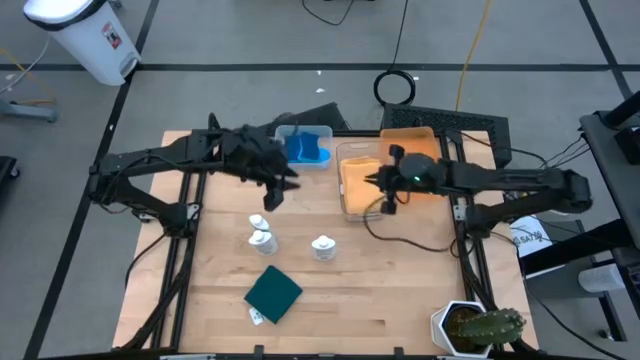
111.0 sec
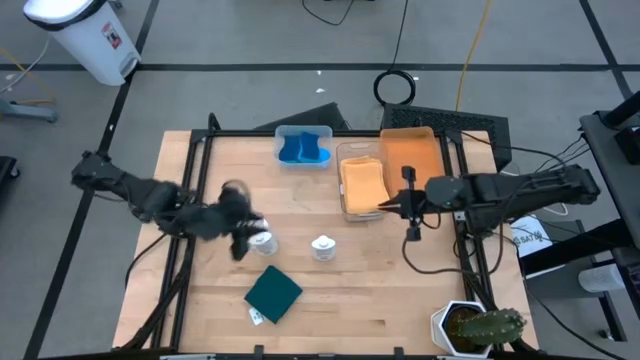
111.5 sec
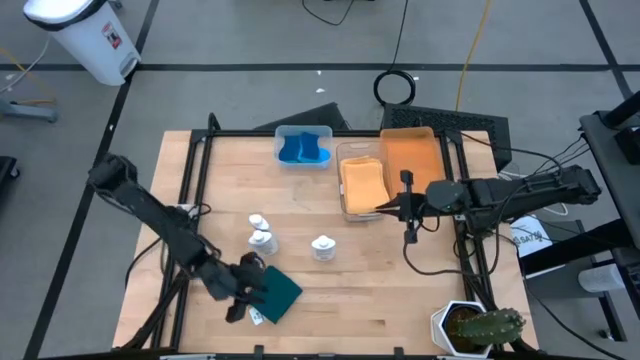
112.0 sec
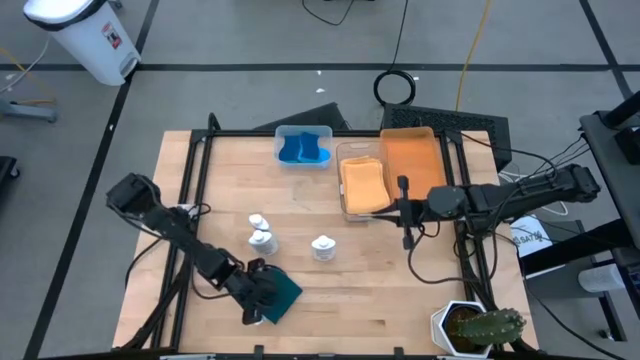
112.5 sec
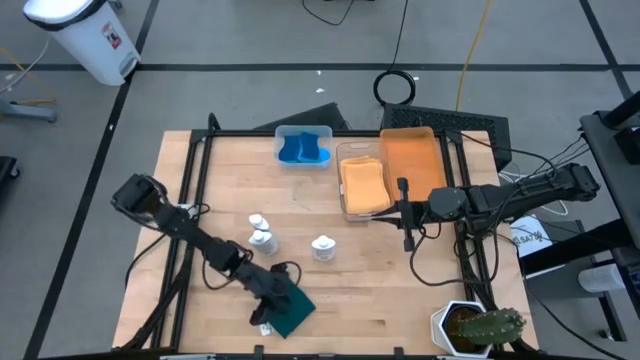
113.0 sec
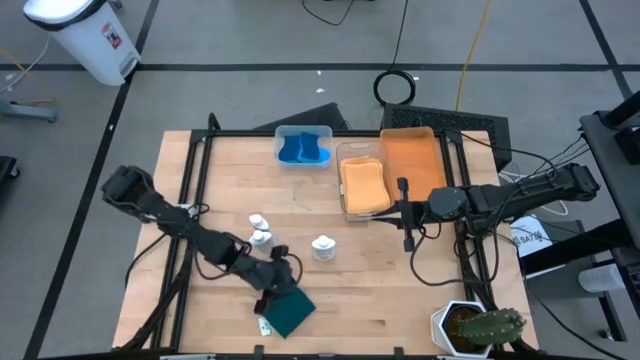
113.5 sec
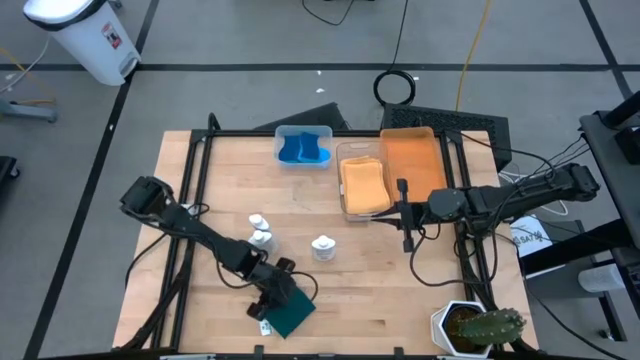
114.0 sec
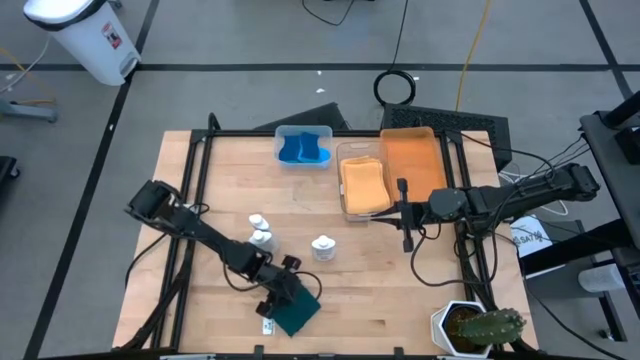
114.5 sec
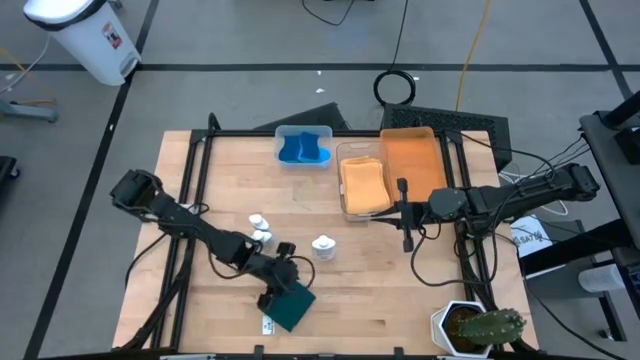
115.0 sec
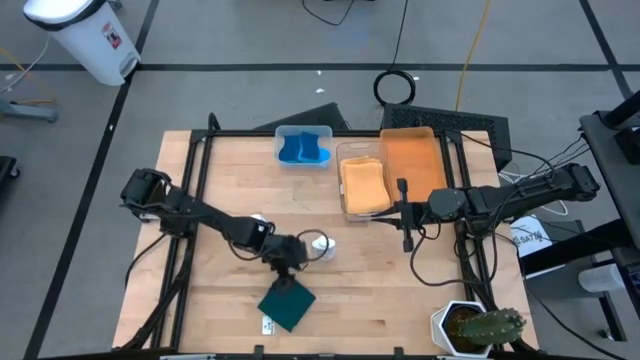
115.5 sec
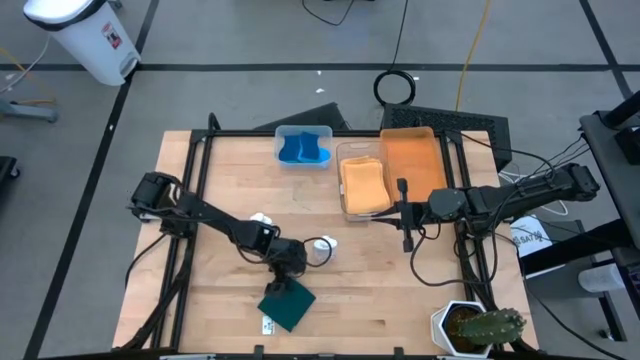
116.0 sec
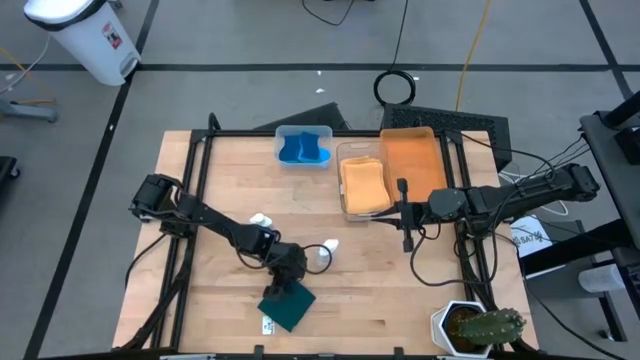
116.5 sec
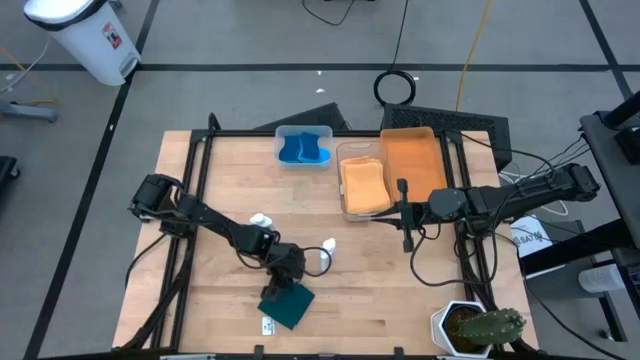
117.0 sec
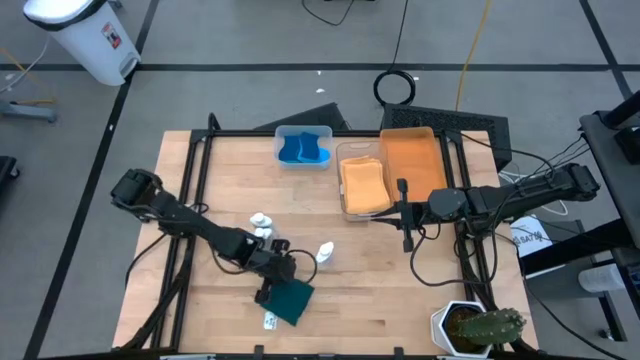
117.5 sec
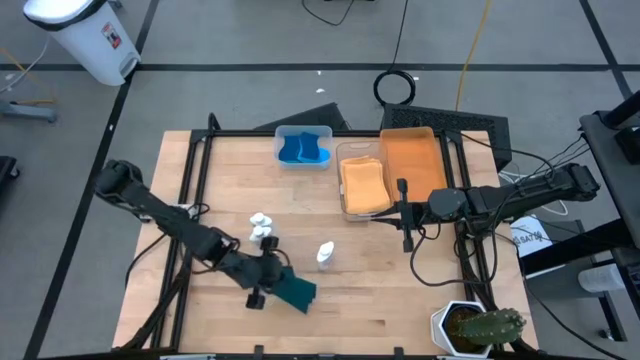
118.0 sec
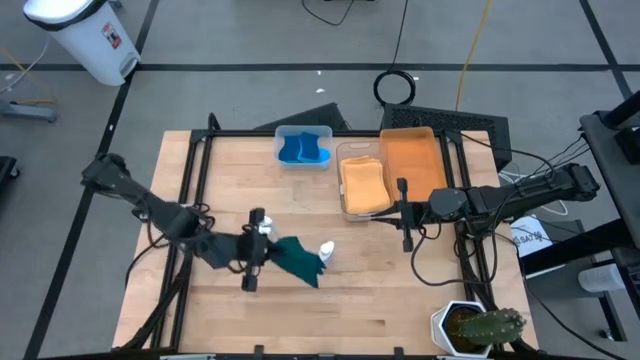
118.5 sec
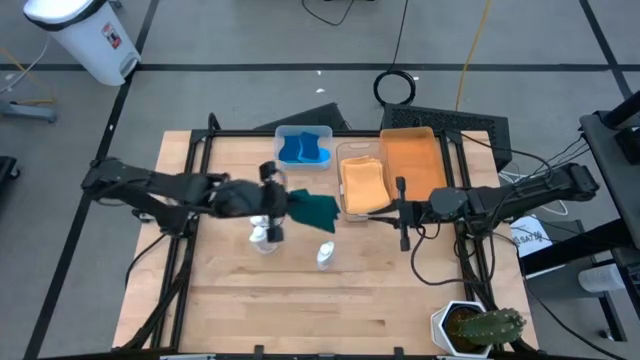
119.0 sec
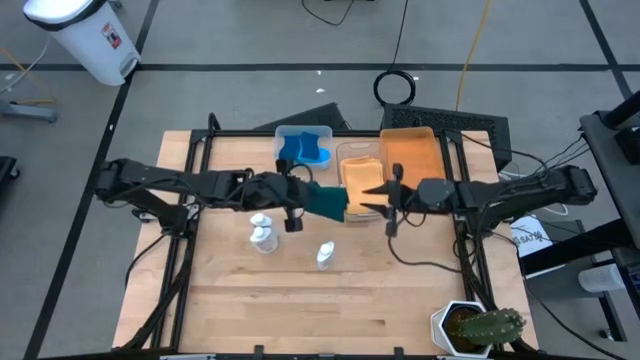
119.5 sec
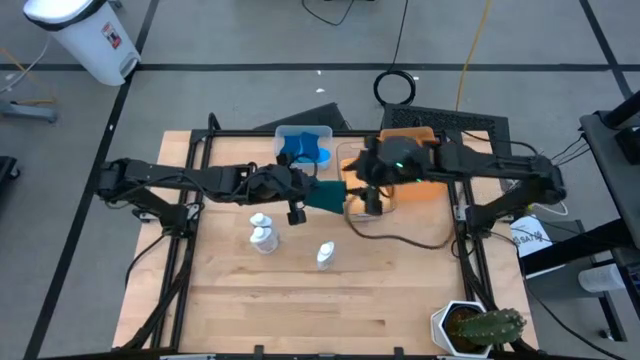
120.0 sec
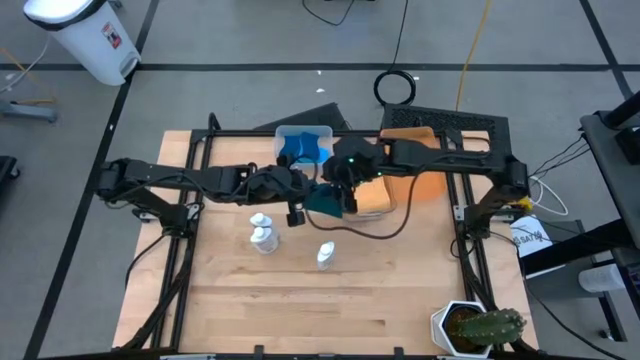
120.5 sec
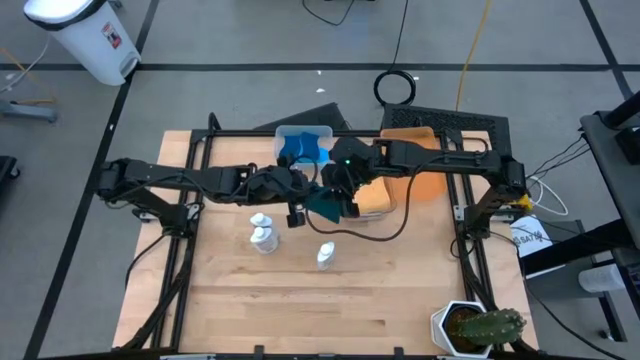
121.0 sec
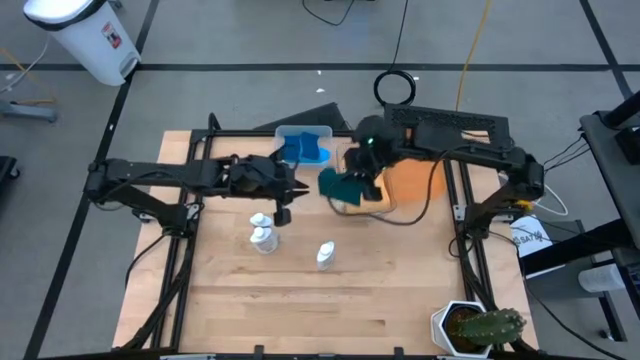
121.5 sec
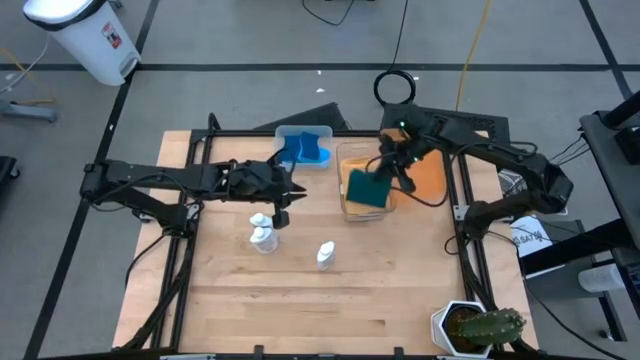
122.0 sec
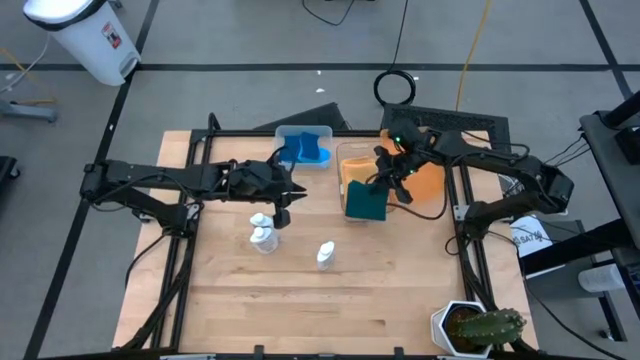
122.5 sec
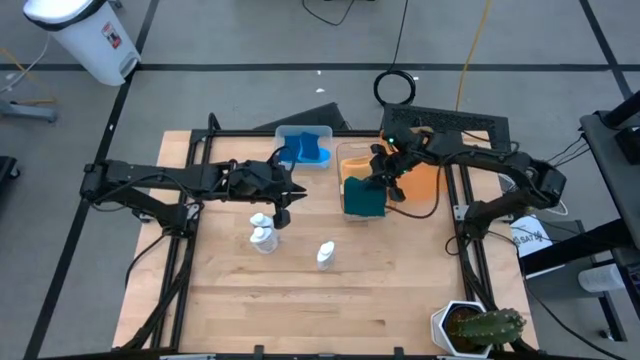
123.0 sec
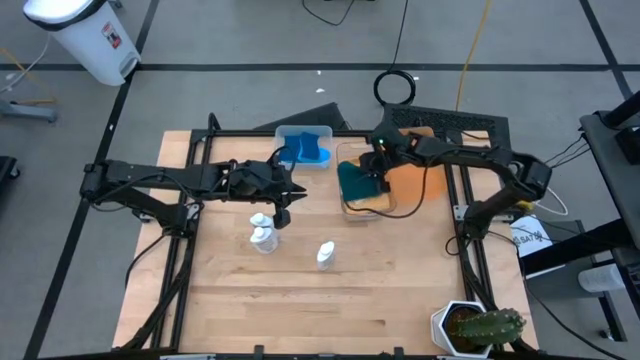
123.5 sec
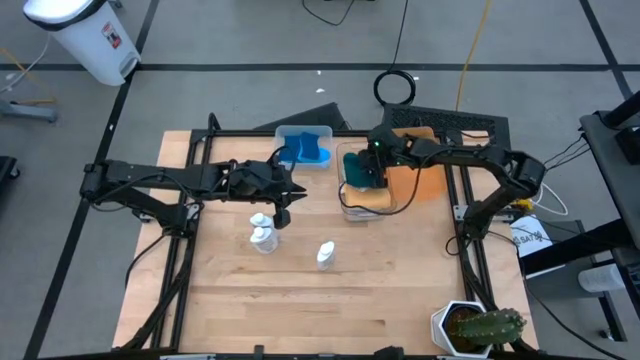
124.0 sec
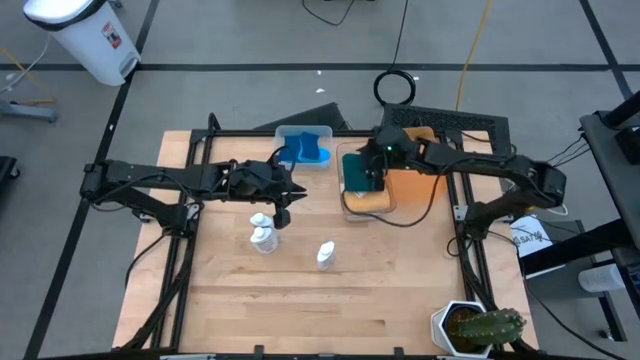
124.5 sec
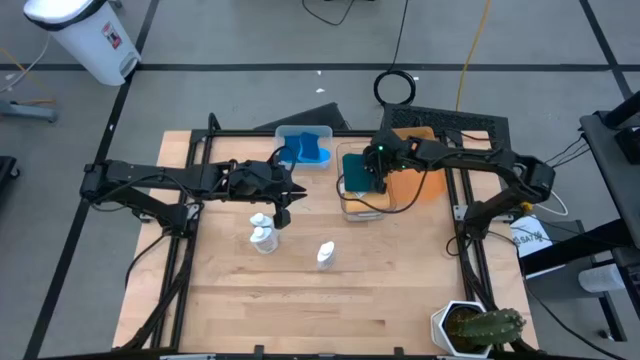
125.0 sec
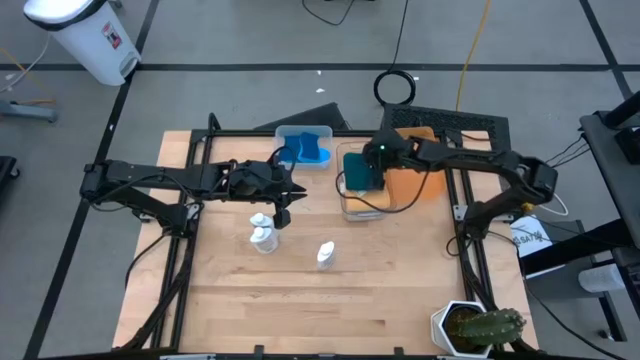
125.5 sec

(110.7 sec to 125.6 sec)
Task: Pick & Place Kitchen Items
Put the dark green towel into the transparent bin

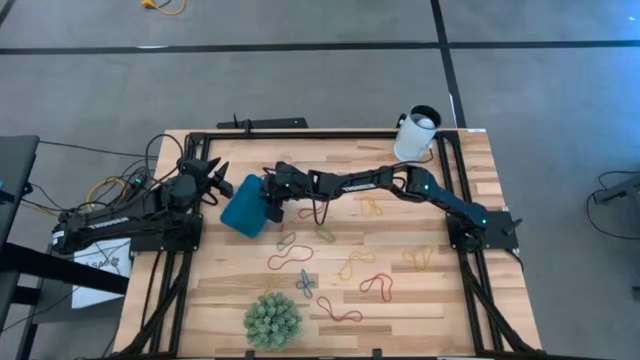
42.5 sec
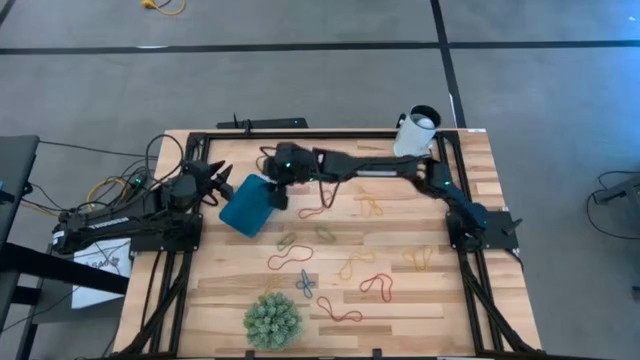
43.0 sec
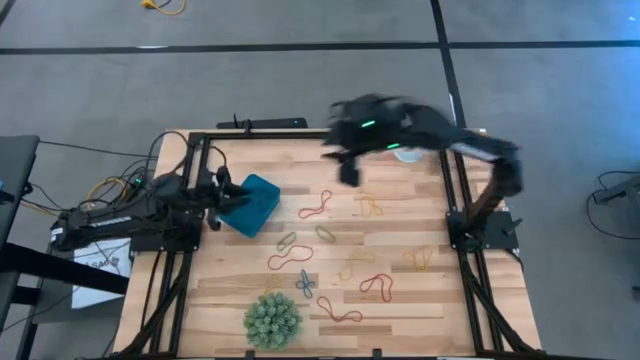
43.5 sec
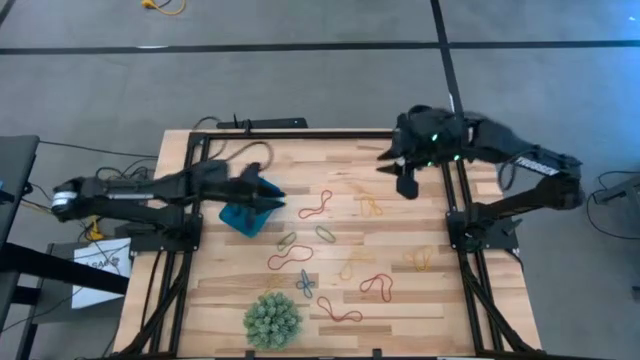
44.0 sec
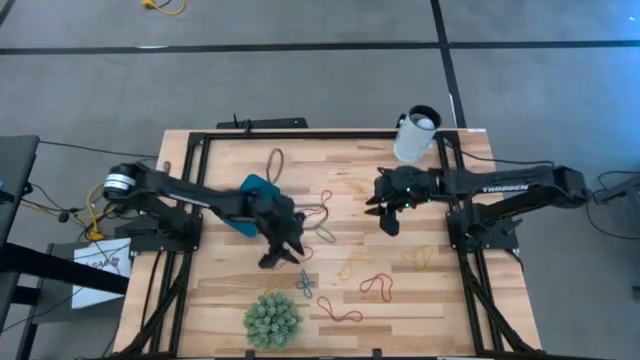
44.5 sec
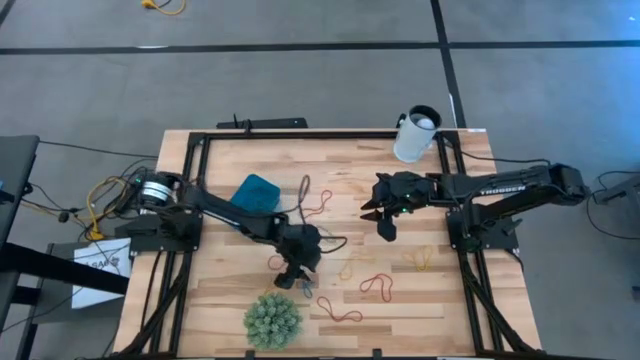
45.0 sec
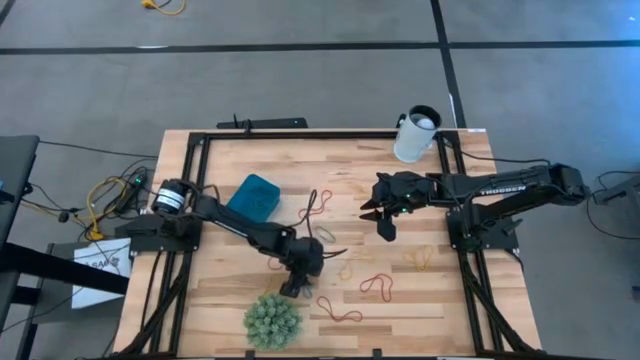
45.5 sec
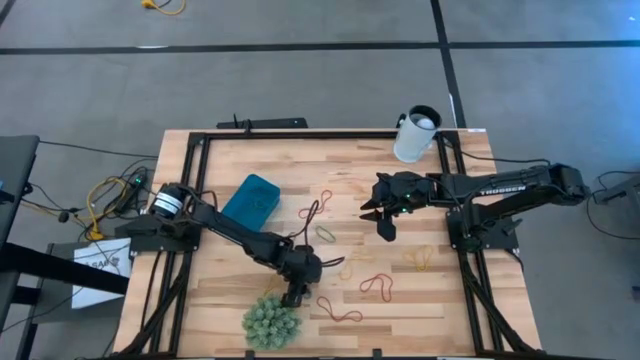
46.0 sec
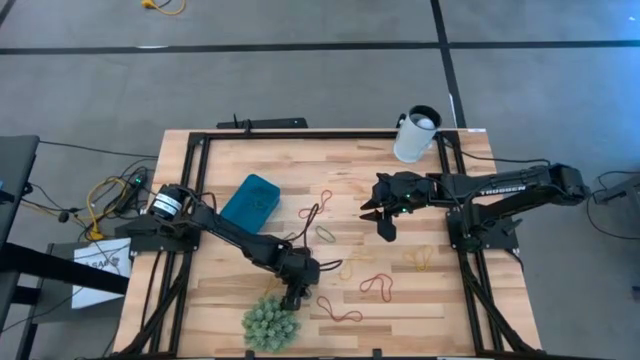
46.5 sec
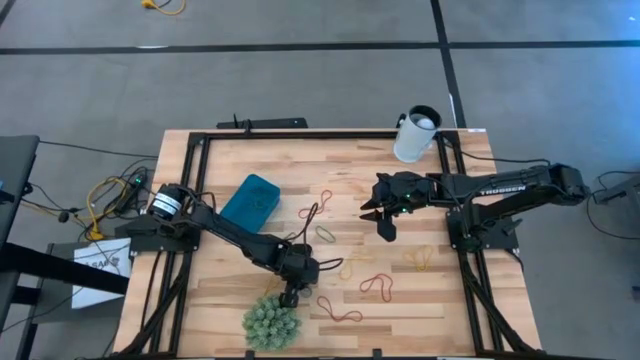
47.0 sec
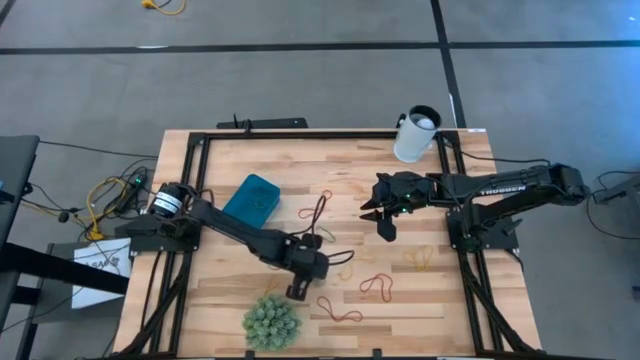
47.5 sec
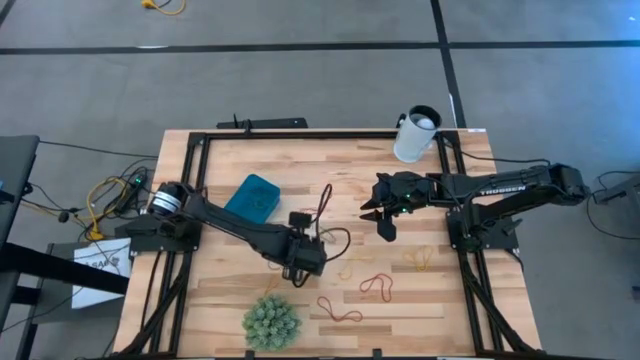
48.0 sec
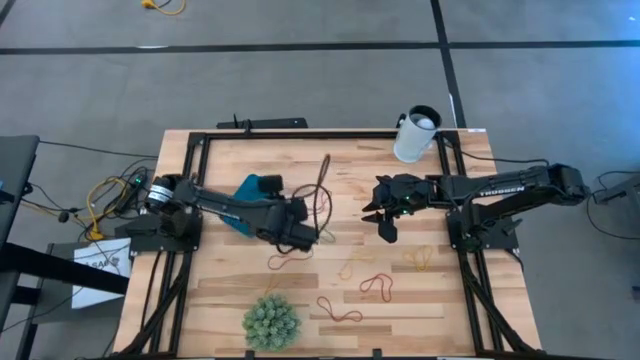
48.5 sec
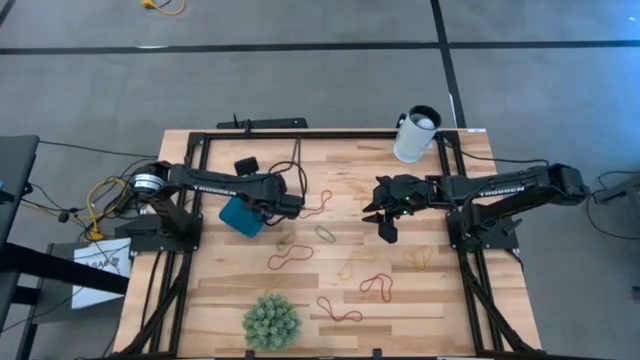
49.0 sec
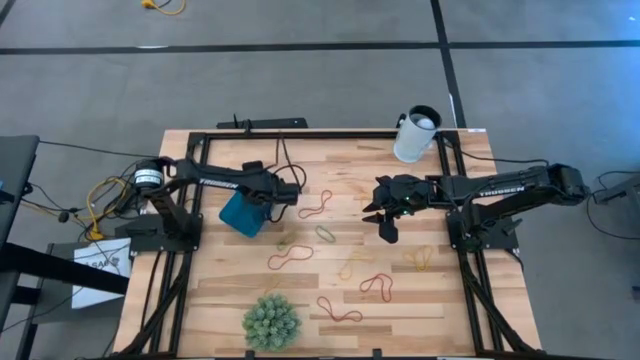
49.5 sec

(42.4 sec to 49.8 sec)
Task: Pick and place items into bin
Put the blue rubber band into the blue bin
